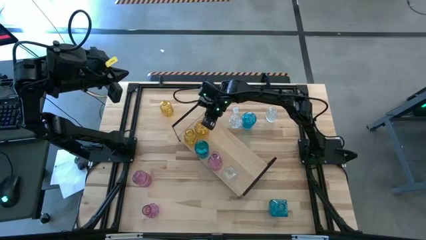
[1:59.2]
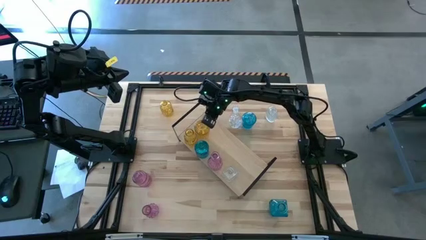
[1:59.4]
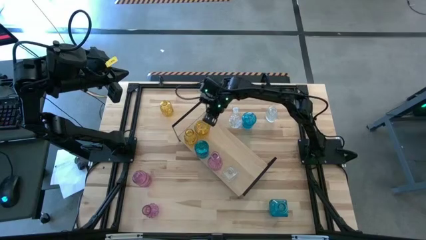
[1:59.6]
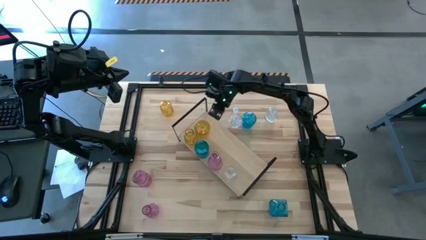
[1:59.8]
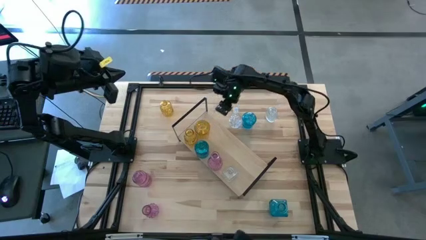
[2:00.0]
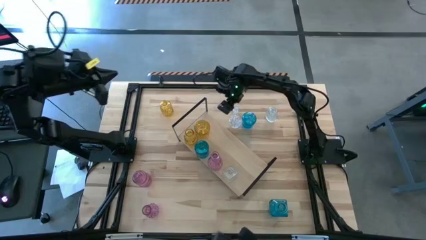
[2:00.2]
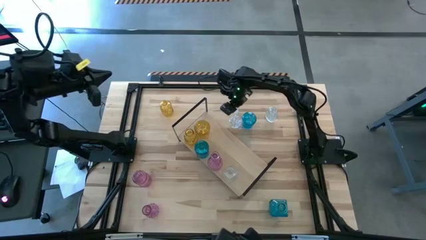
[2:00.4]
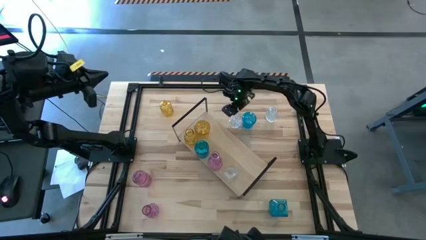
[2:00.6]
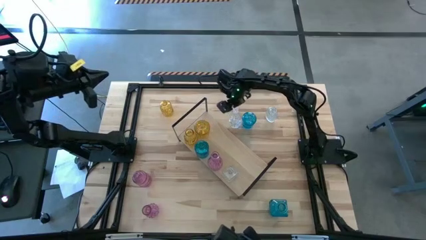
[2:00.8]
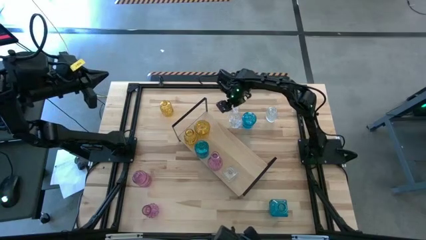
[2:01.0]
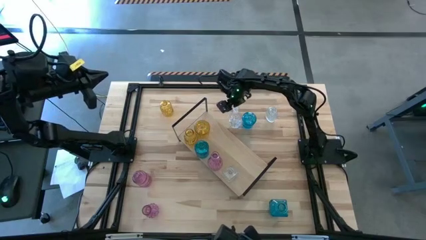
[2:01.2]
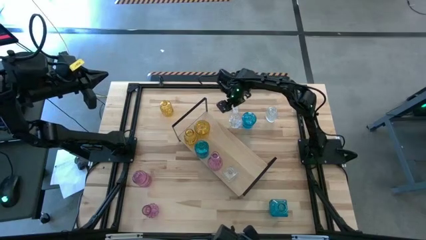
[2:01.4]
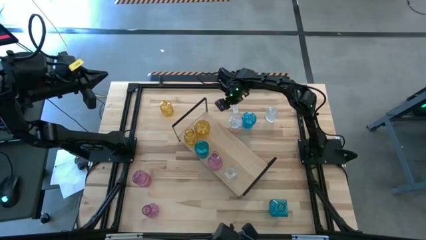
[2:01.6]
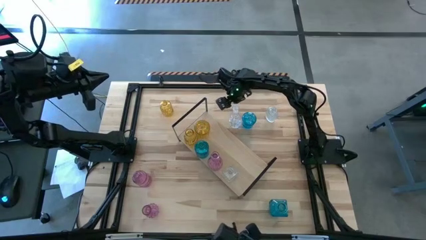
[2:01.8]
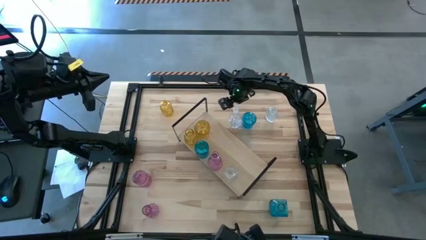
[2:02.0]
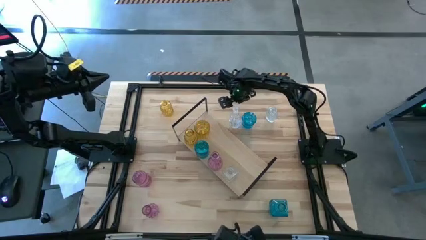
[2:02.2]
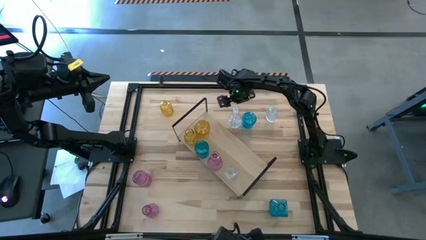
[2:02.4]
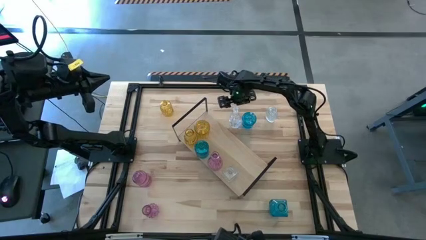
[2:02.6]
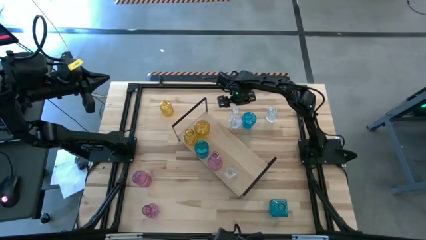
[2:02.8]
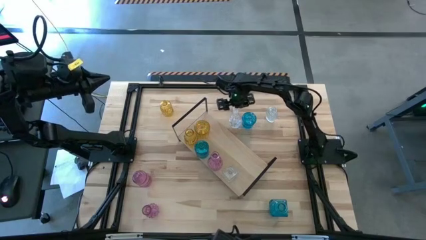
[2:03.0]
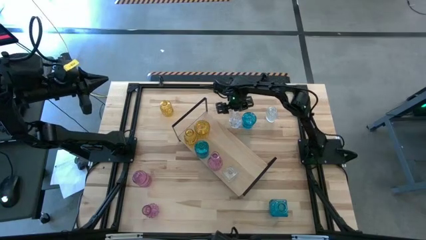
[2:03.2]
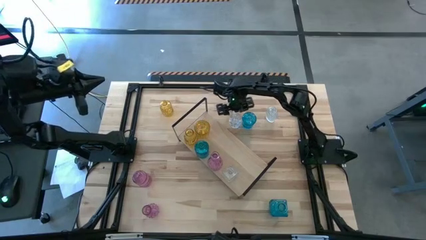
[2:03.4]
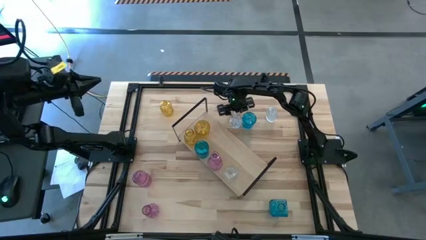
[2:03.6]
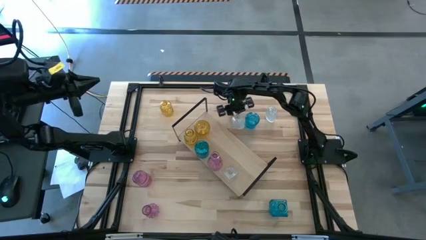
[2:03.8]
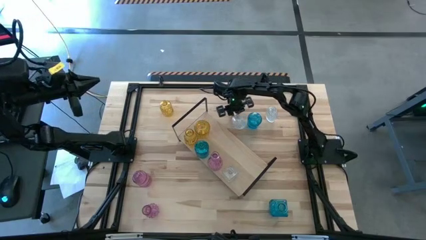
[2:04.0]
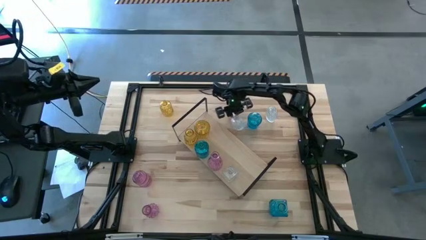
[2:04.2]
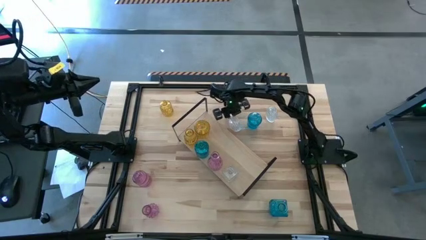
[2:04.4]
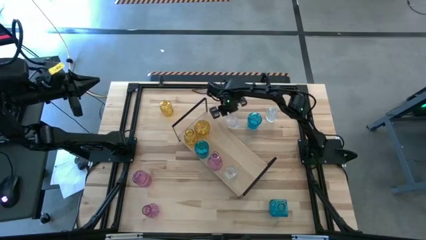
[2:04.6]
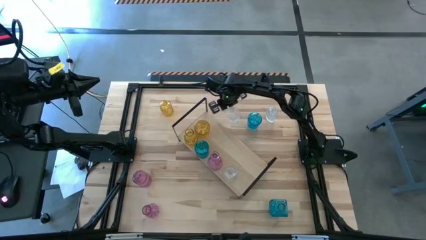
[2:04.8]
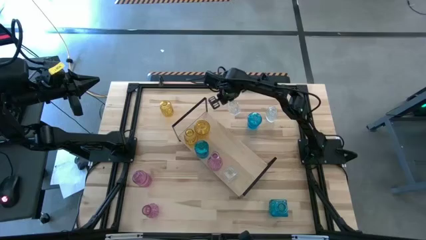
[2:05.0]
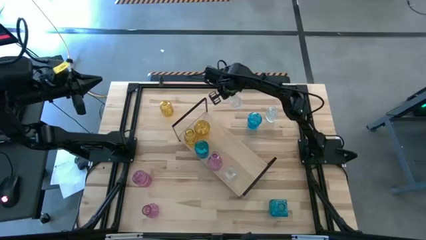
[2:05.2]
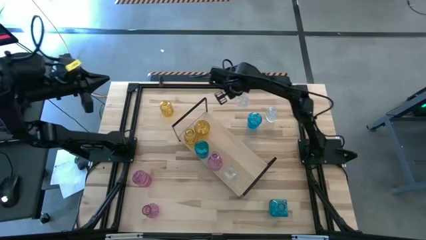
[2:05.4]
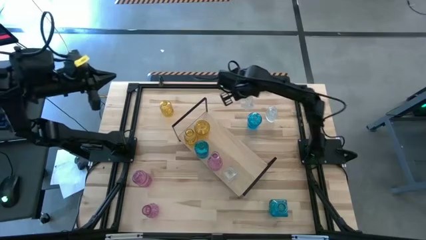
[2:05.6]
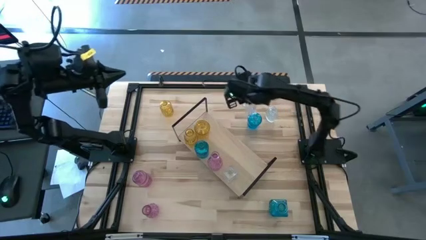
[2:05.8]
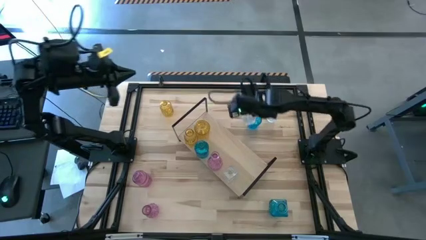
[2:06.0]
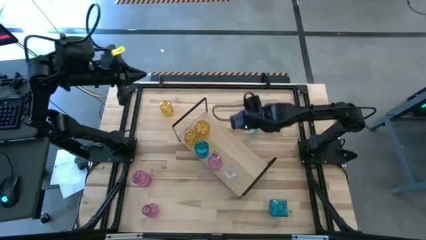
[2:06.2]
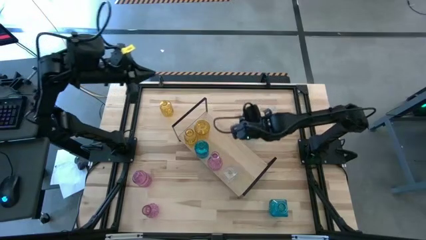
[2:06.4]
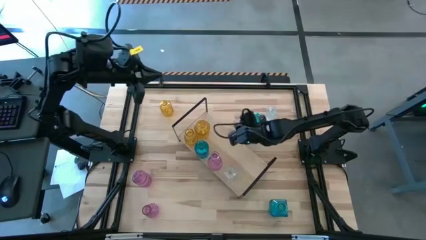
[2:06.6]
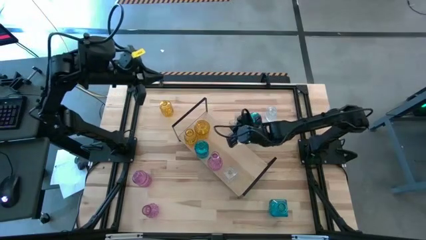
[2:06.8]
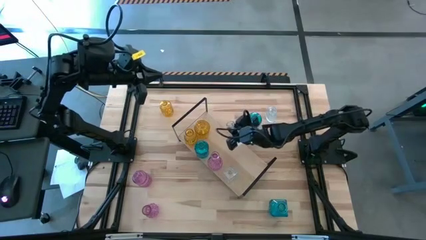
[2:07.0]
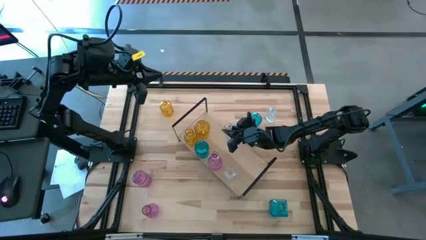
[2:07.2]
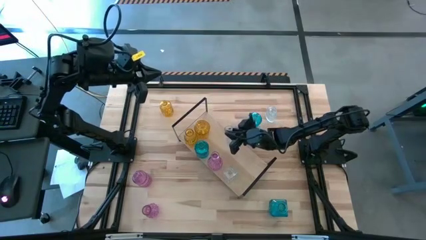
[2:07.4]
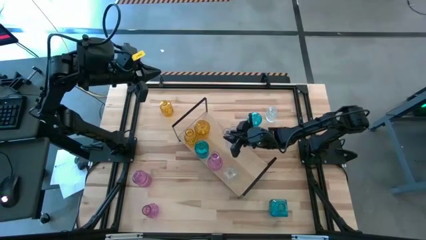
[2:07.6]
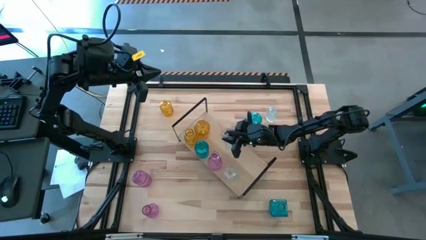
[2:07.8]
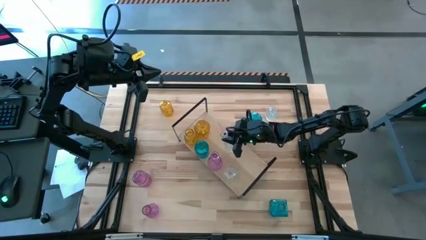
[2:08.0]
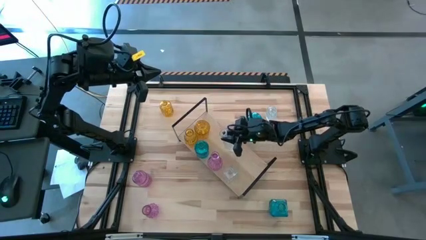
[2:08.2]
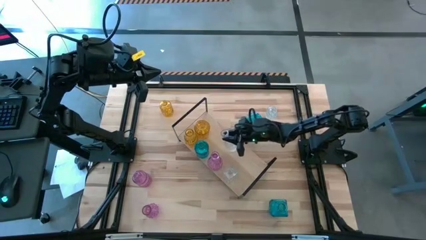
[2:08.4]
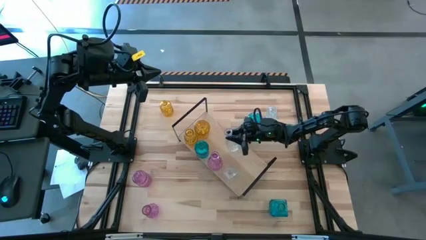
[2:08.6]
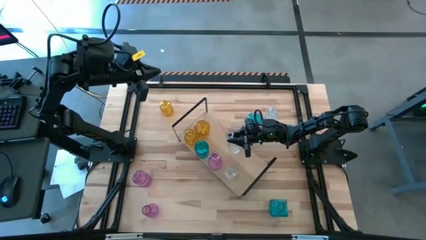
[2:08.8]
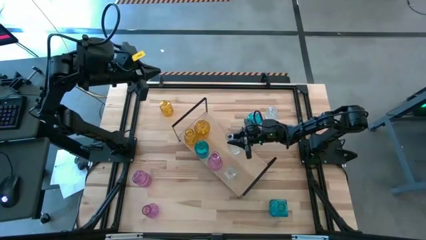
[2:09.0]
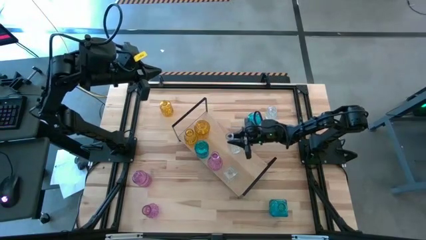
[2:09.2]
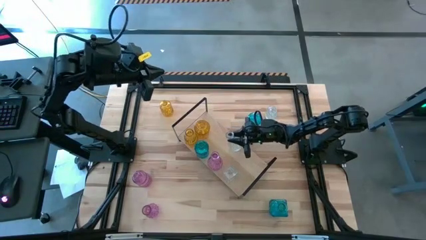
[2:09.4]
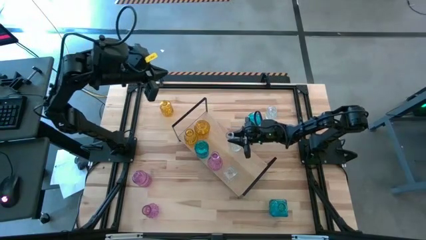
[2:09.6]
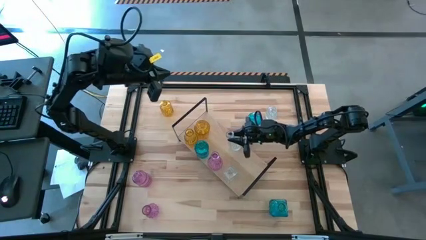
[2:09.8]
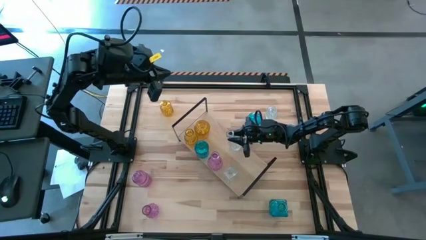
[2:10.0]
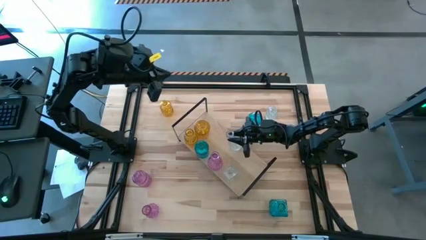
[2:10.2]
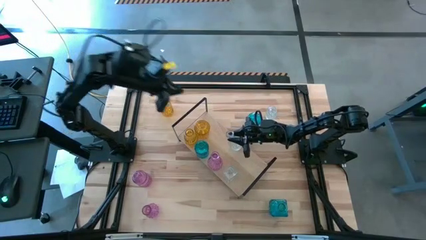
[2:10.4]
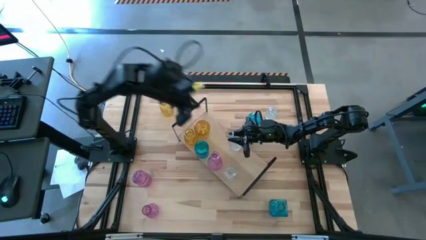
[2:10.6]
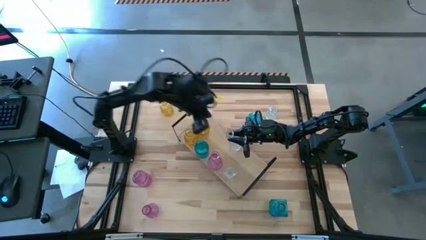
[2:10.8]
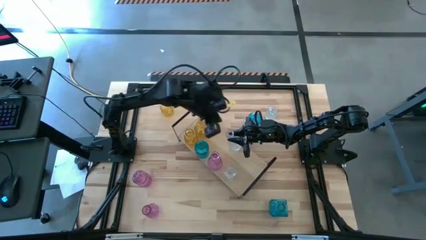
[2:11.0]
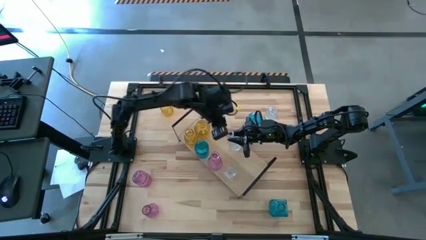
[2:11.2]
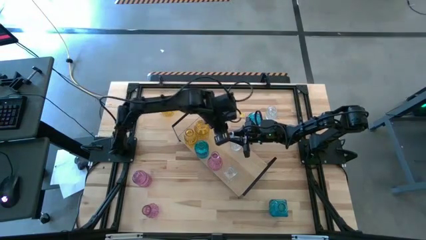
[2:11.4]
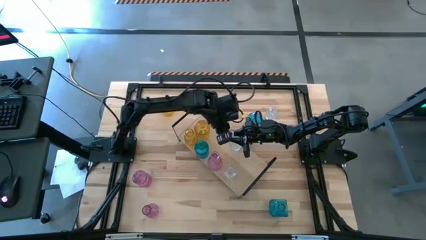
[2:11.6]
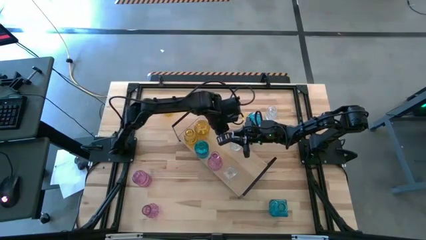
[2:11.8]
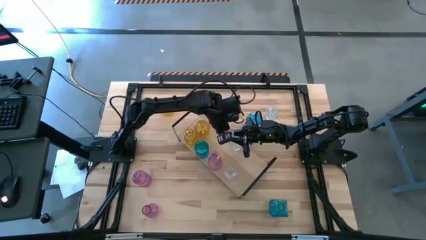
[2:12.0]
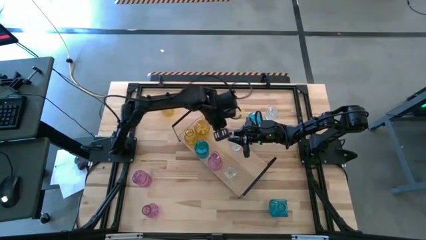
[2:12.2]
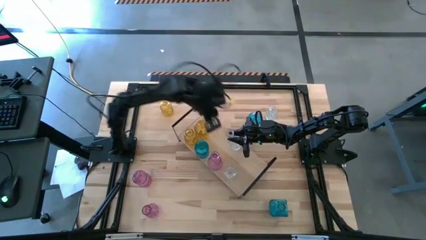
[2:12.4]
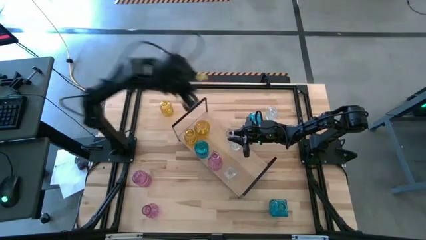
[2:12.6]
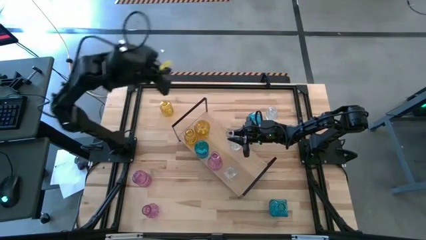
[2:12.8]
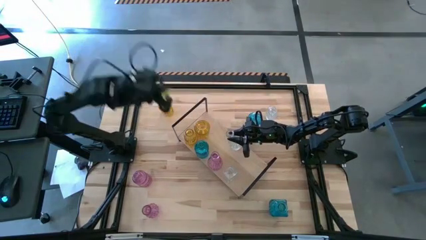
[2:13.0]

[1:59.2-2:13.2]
Task: sort vases onto shelf
Put the left crystal vase on the shelf
